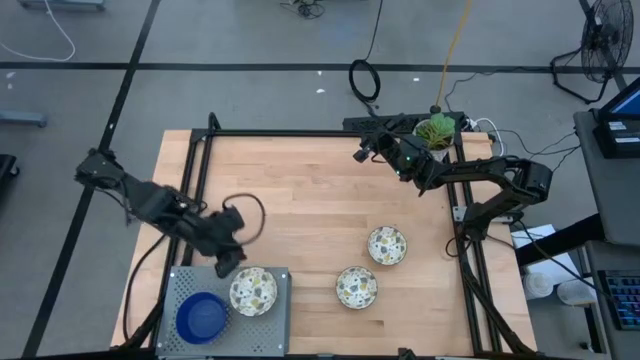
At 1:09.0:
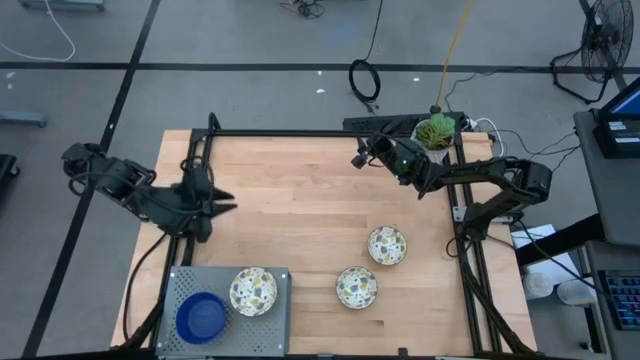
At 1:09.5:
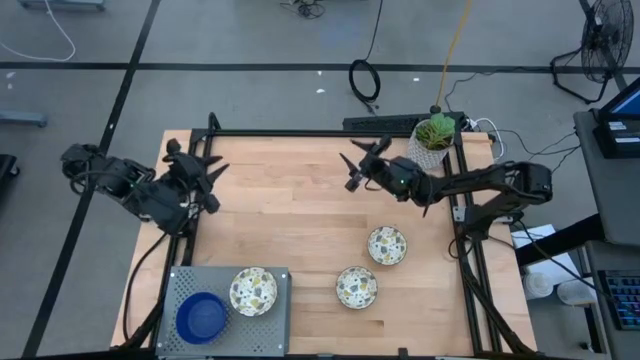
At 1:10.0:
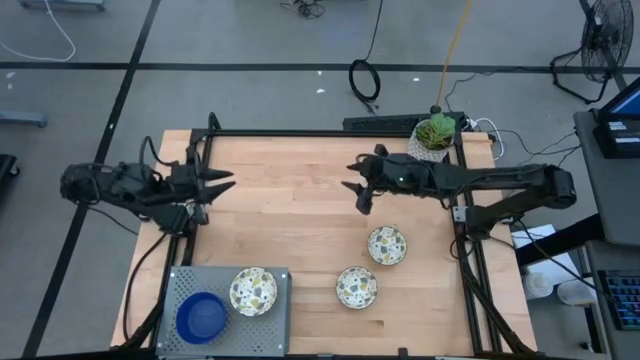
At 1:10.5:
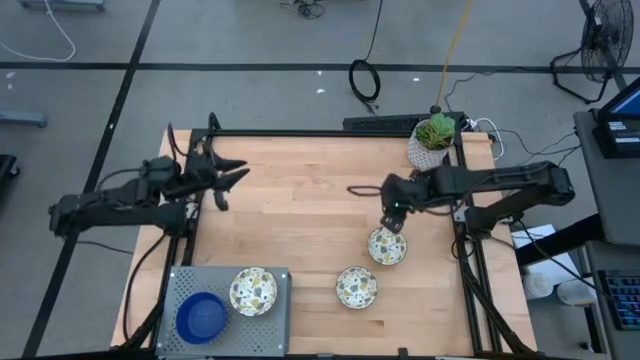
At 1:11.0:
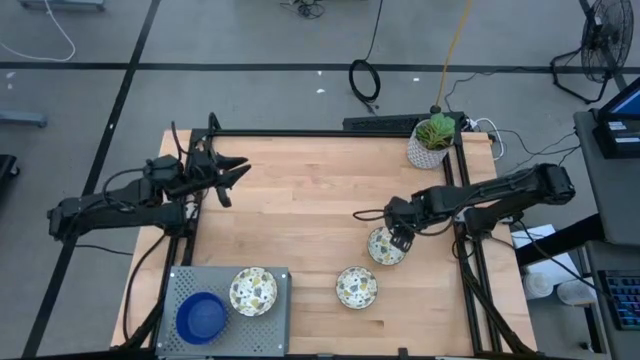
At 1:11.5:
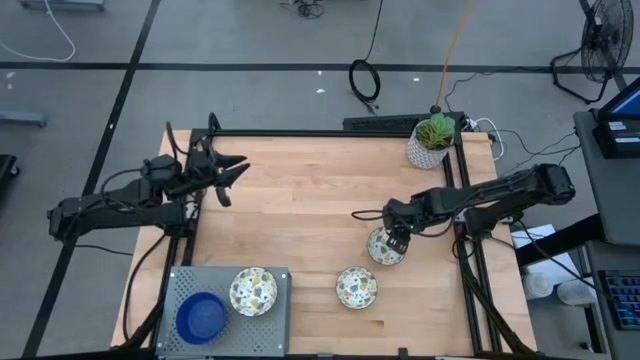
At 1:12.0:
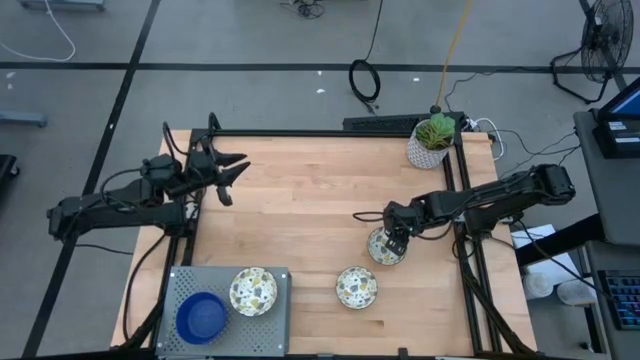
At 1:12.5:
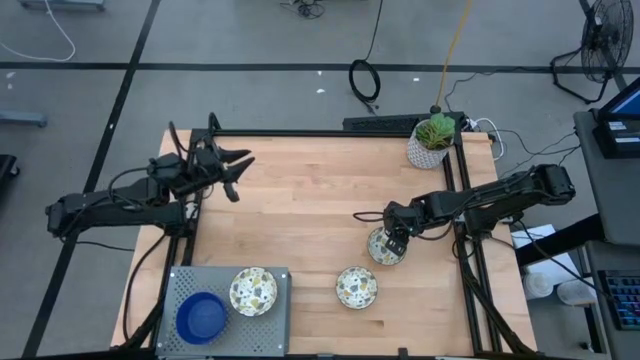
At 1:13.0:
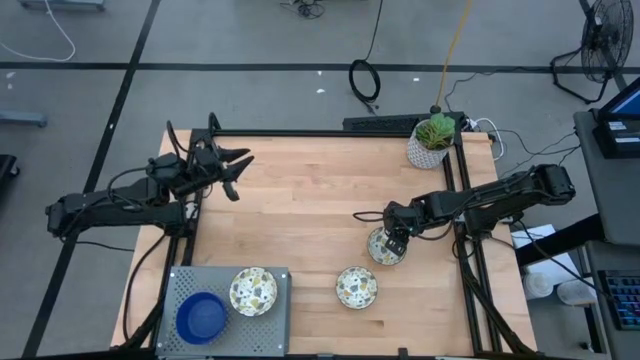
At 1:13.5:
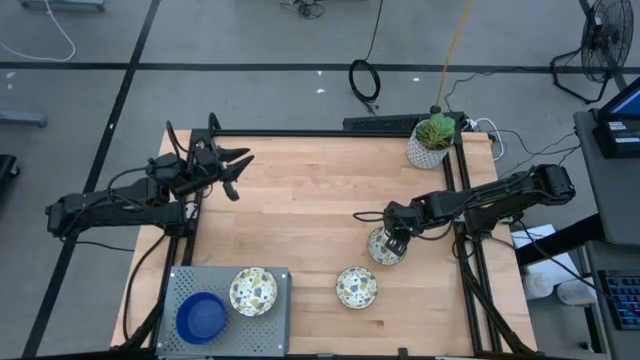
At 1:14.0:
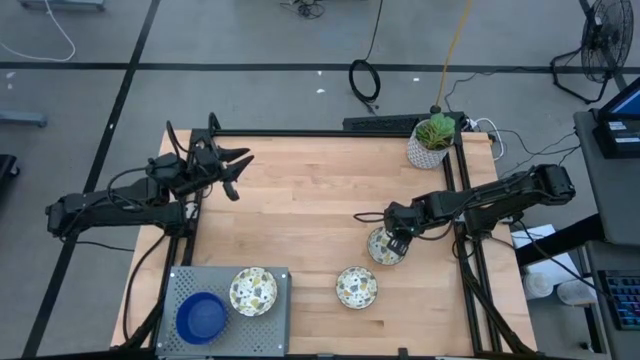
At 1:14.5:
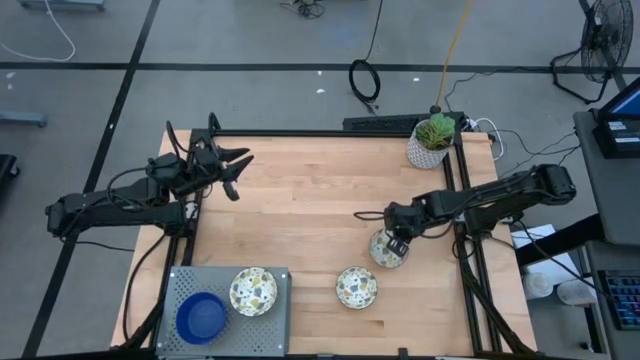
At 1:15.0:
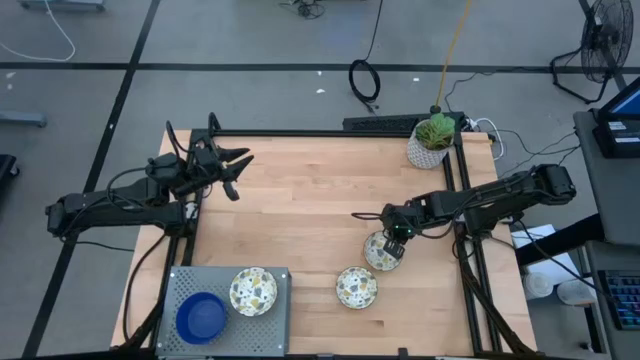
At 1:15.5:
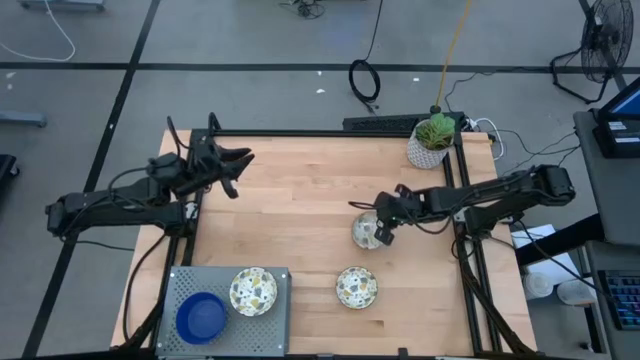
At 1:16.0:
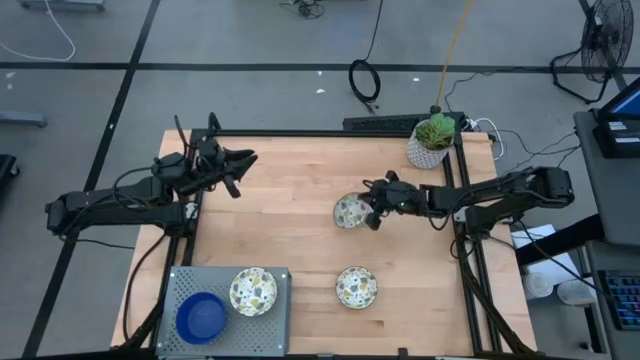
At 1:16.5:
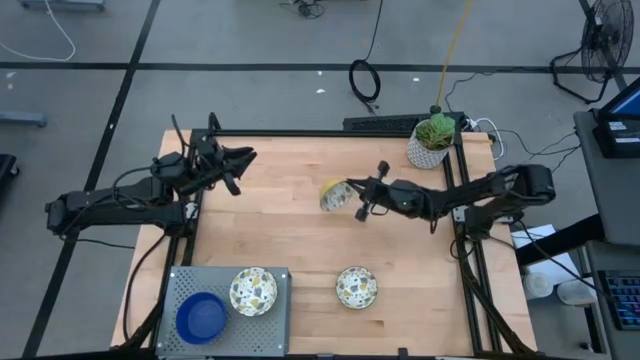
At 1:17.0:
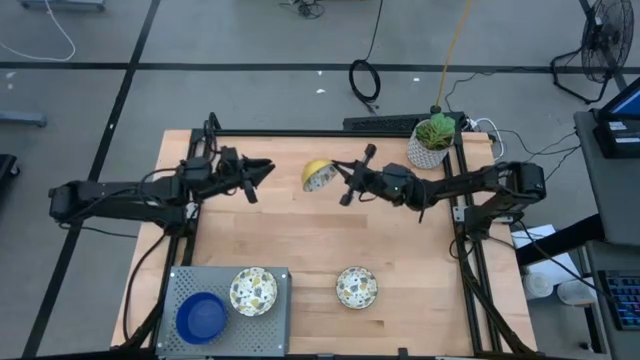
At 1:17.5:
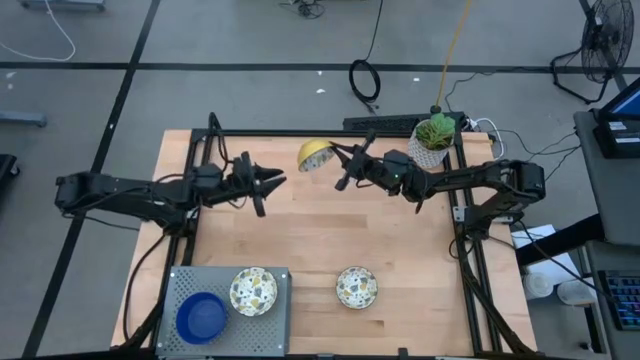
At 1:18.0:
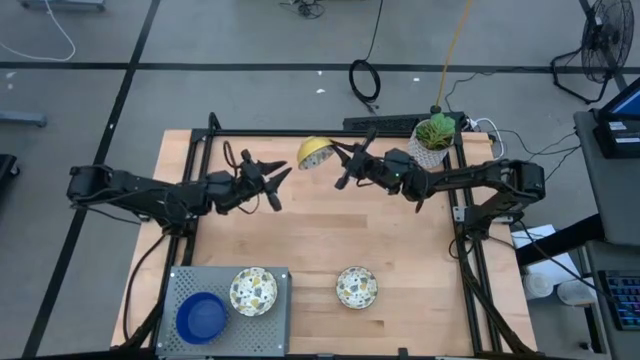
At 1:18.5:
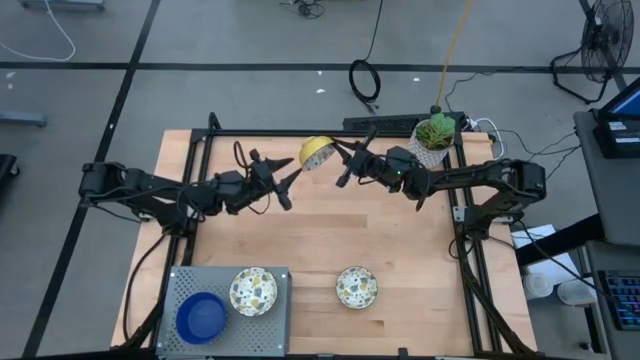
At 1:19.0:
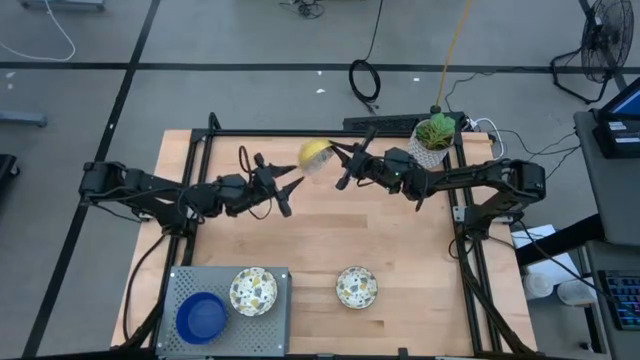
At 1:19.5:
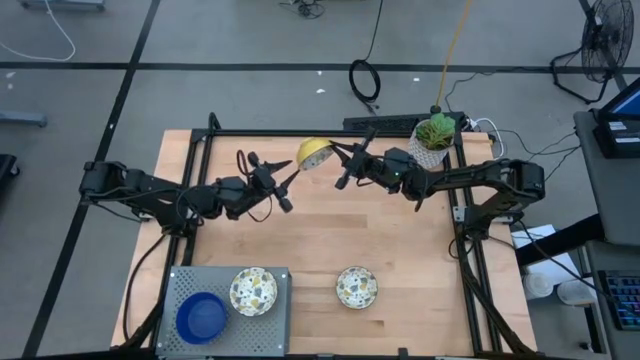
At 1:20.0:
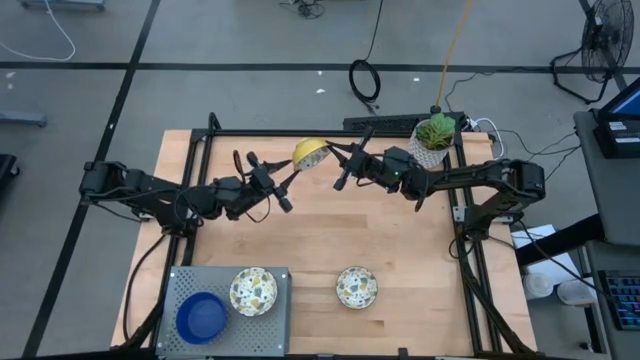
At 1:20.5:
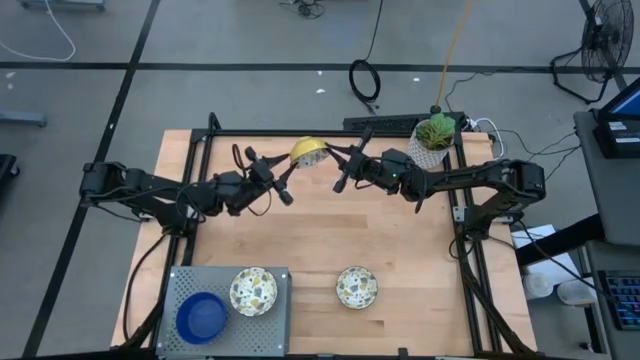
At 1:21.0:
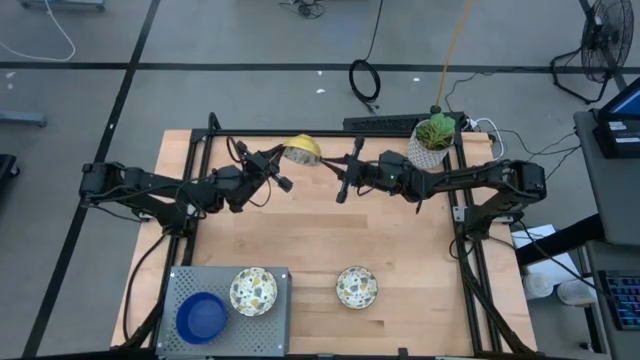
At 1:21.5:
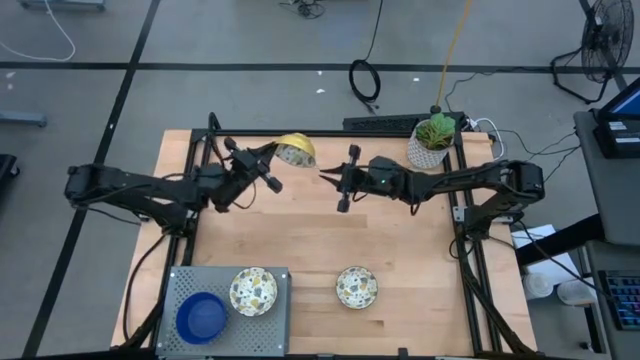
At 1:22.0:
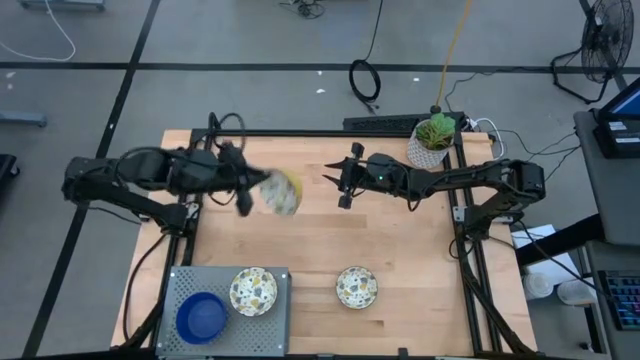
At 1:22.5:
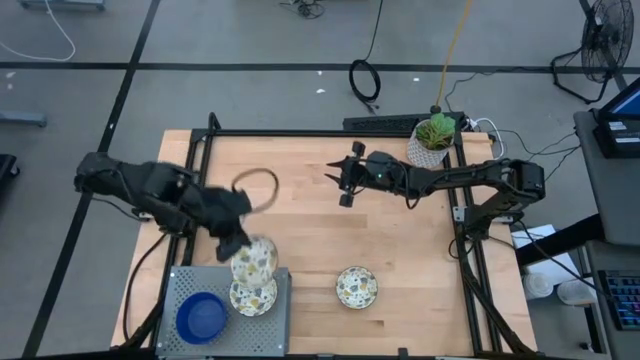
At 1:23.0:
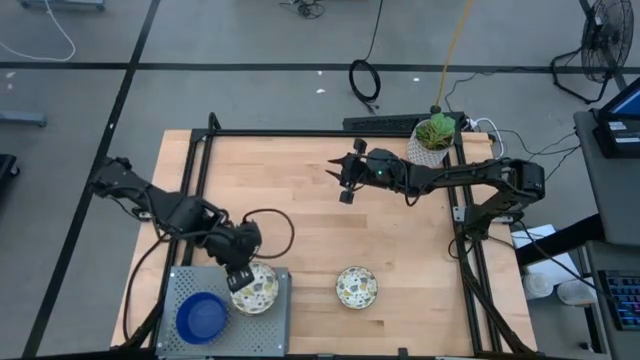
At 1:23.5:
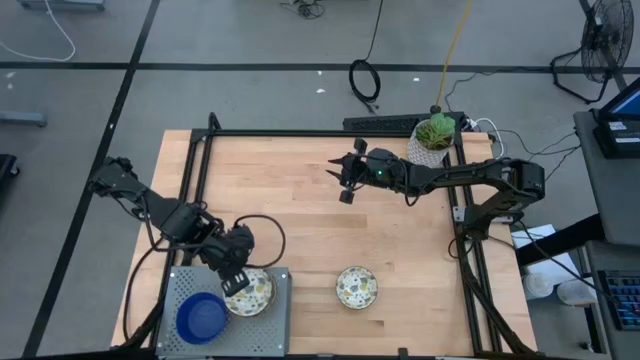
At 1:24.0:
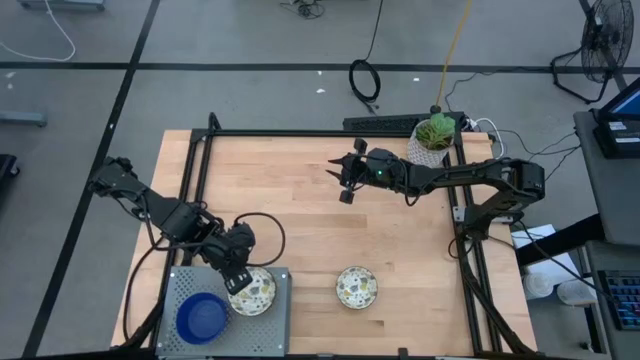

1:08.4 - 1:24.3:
Task: Pick & Place Mini bowls
Stack the top white patterned bowl on top of the other white patterned bowl on the shelf

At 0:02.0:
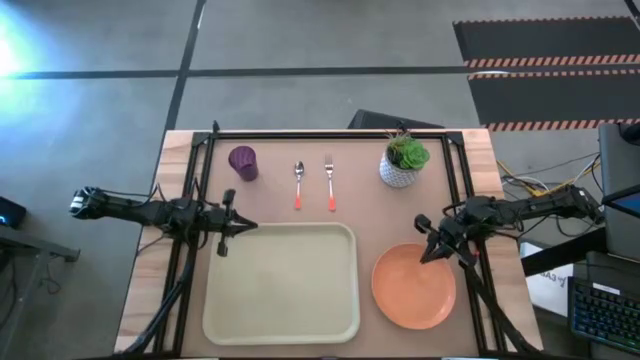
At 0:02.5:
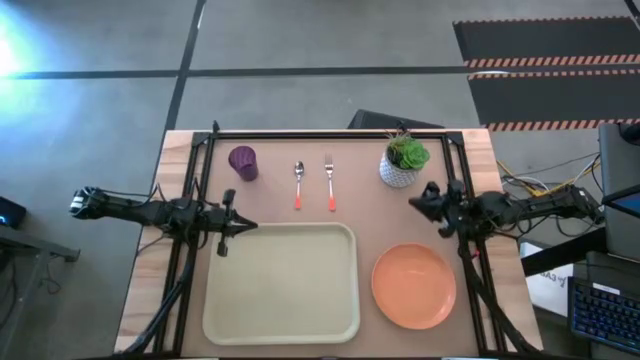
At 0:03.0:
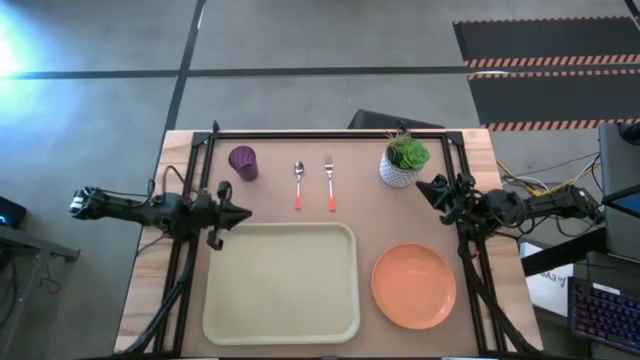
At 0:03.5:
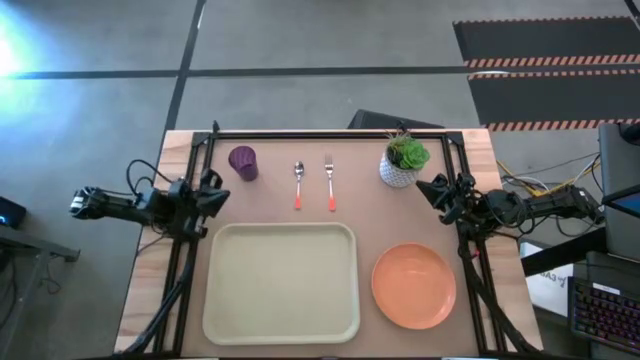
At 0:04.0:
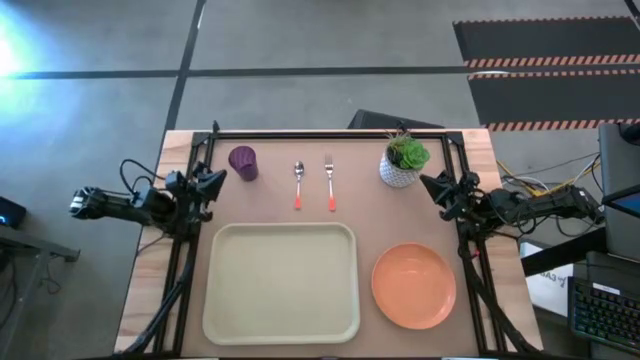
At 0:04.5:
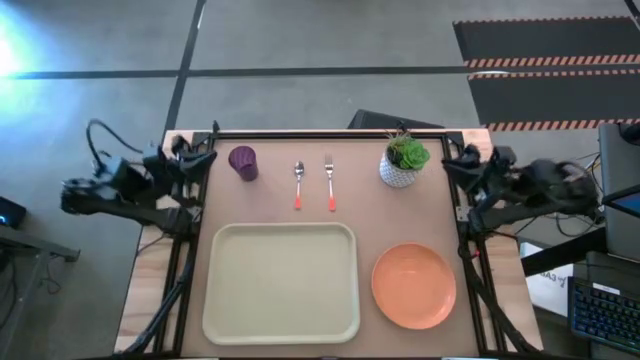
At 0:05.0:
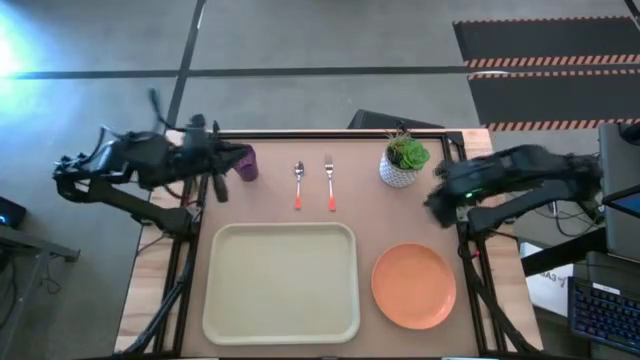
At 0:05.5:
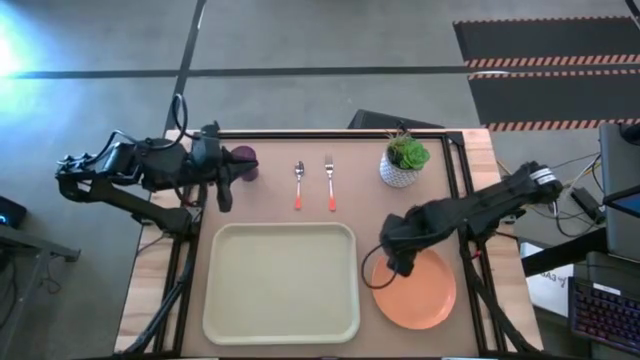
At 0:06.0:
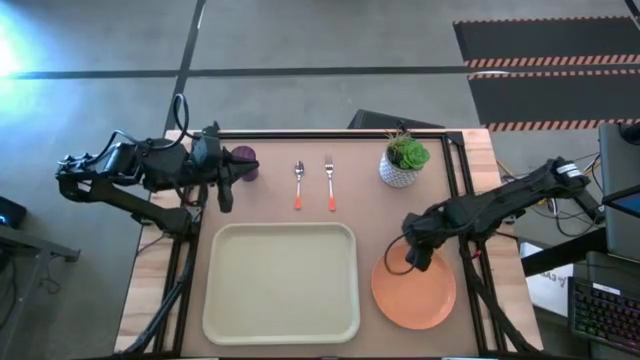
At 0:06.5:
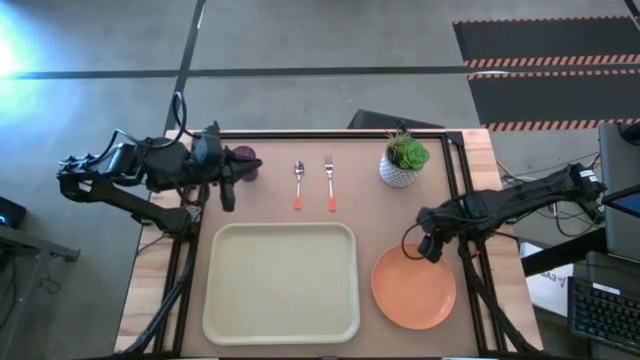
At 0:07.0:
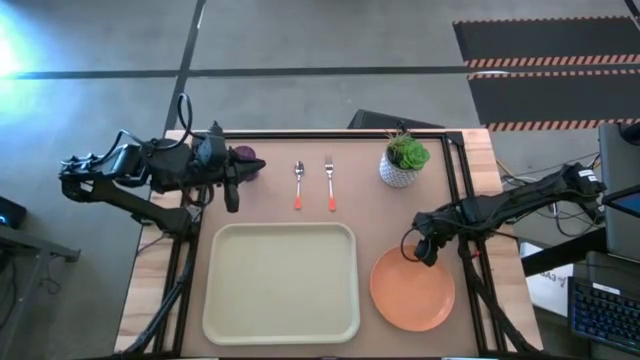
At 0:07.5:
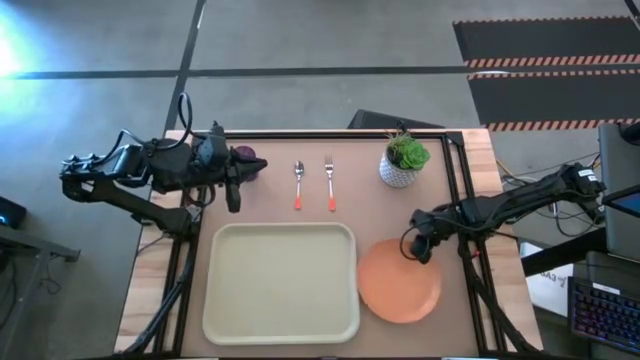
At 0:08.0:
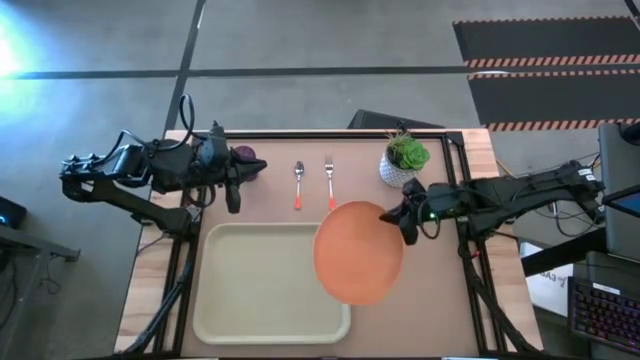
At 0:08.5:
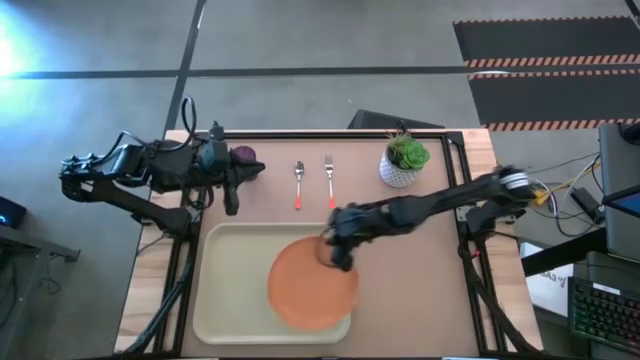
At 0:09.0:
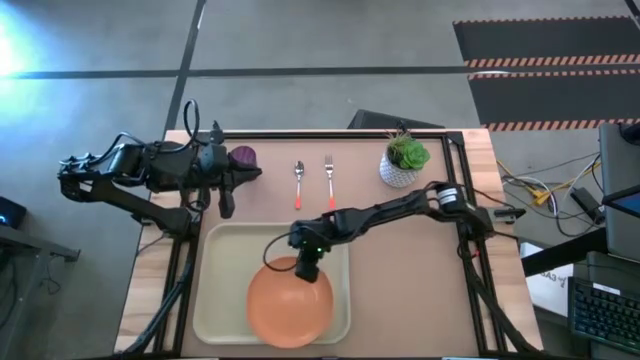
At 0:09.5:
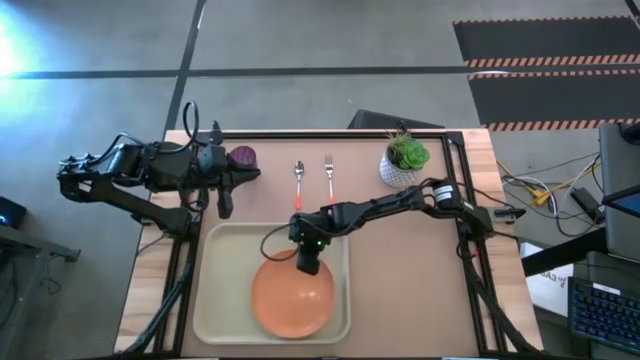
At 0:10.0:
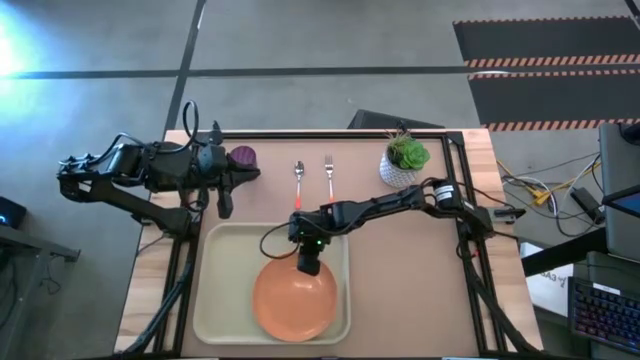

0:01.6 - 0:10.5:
Task: Pick and place plate/cup/fork/spoon on tray
Put the orange plate on the white tray
